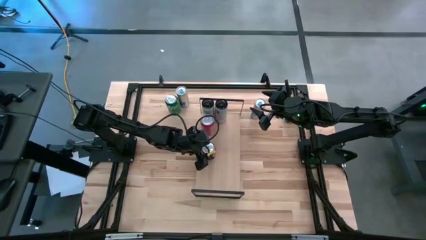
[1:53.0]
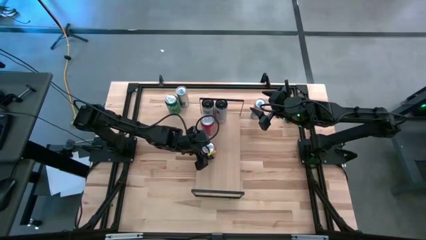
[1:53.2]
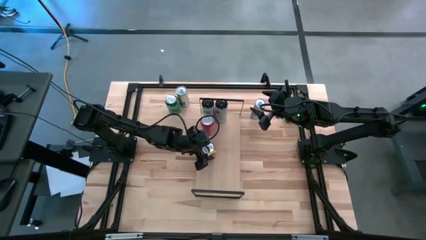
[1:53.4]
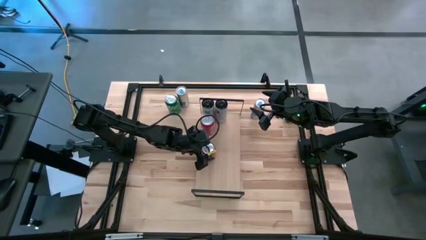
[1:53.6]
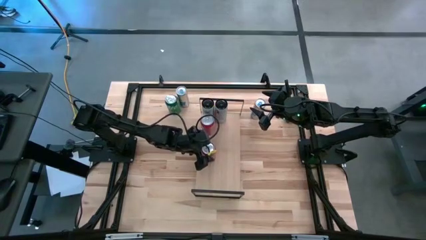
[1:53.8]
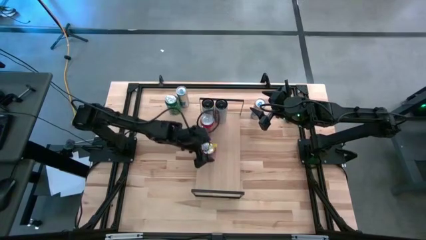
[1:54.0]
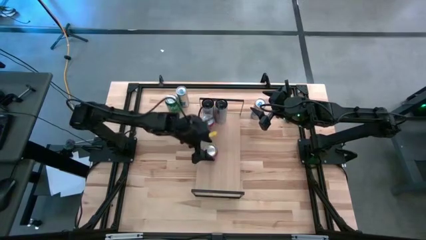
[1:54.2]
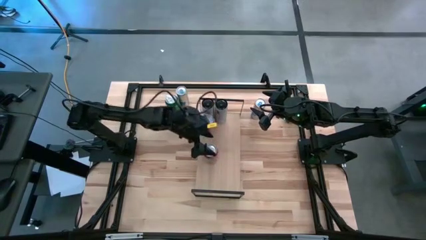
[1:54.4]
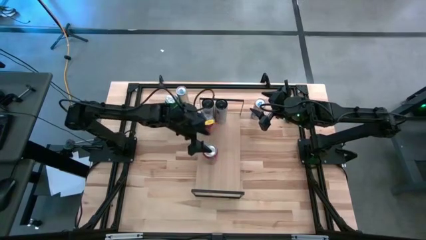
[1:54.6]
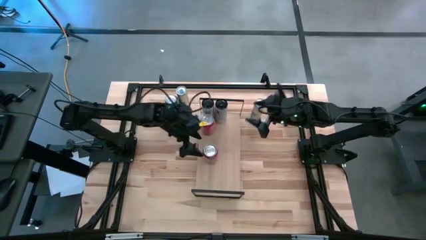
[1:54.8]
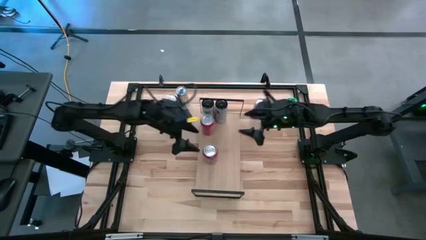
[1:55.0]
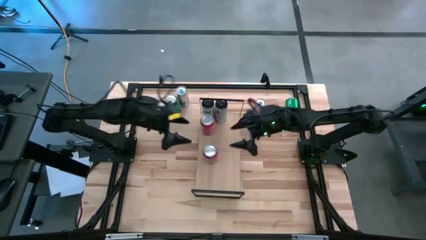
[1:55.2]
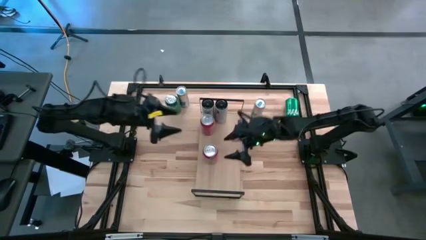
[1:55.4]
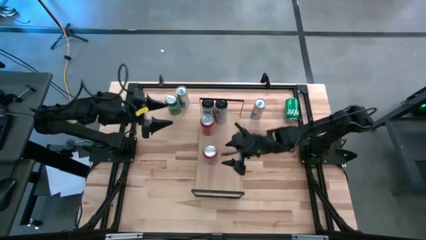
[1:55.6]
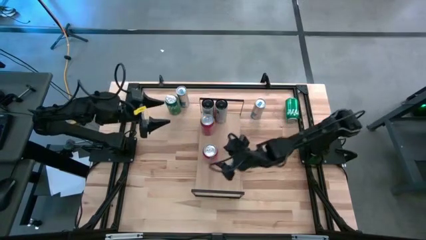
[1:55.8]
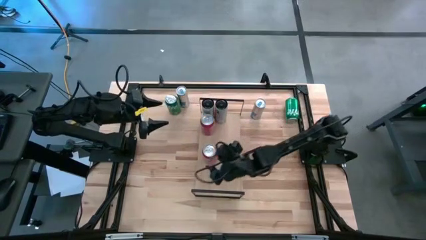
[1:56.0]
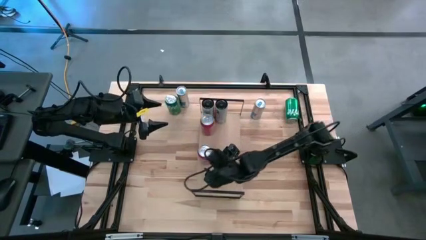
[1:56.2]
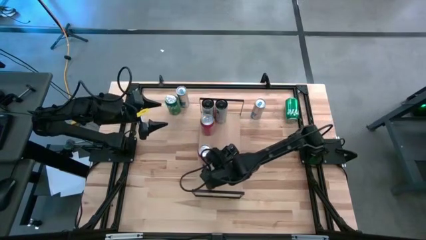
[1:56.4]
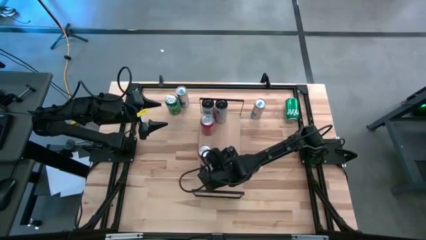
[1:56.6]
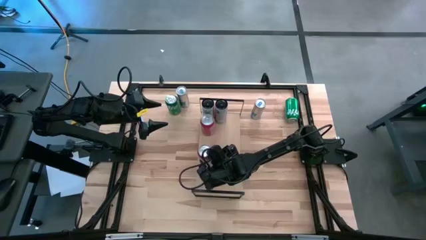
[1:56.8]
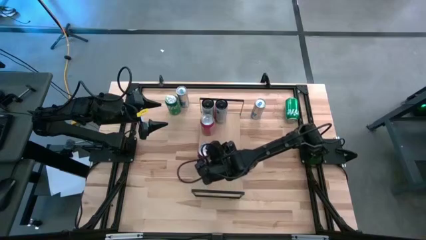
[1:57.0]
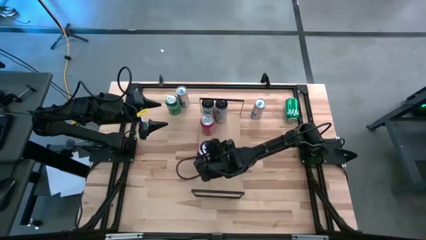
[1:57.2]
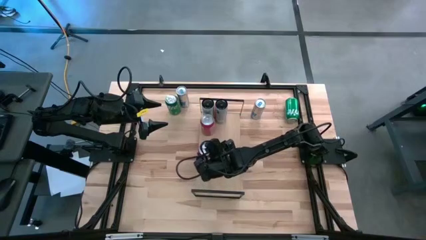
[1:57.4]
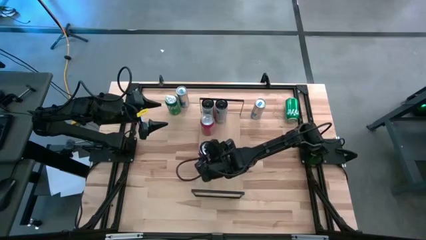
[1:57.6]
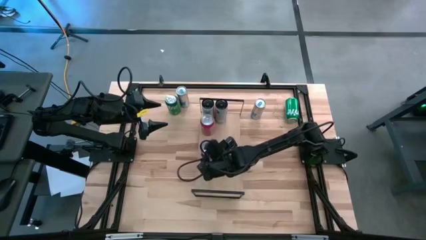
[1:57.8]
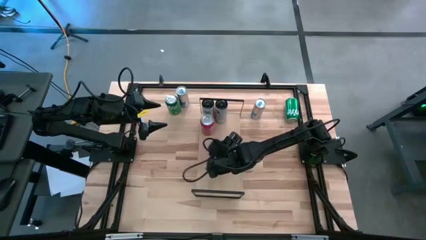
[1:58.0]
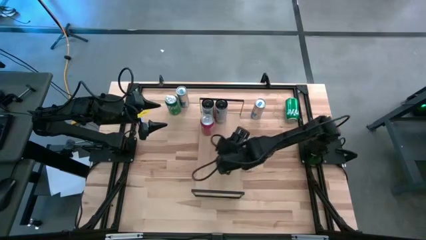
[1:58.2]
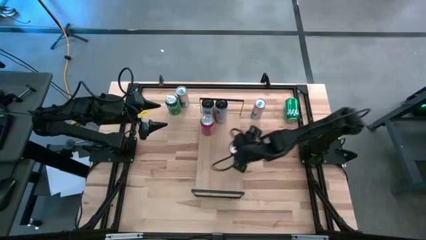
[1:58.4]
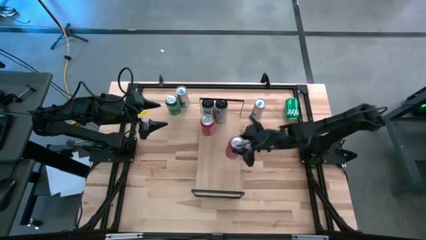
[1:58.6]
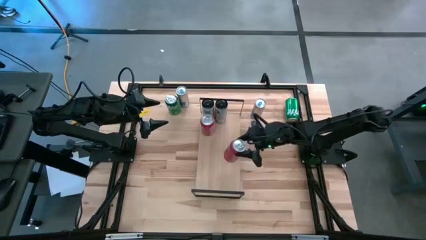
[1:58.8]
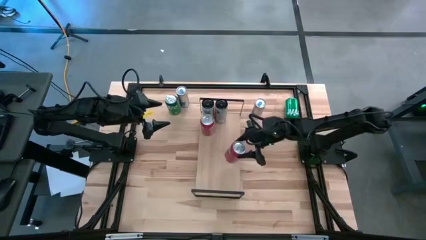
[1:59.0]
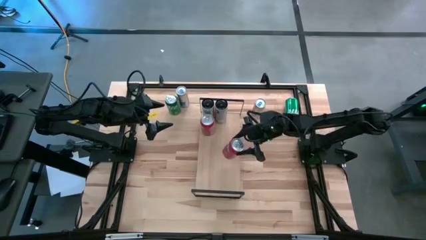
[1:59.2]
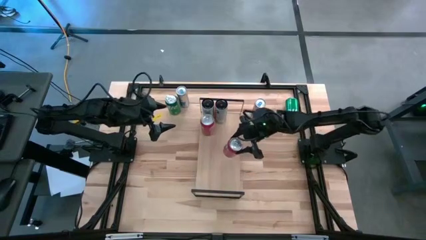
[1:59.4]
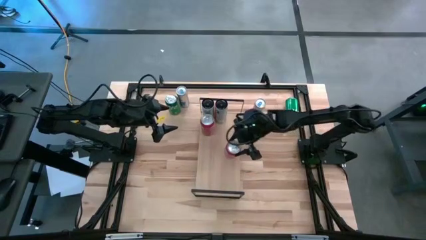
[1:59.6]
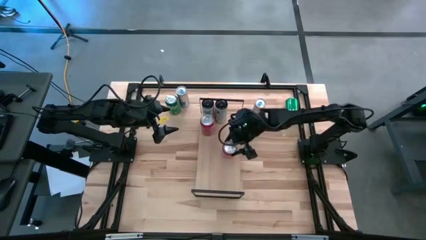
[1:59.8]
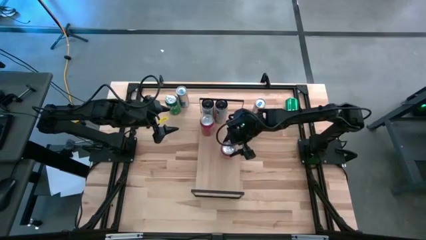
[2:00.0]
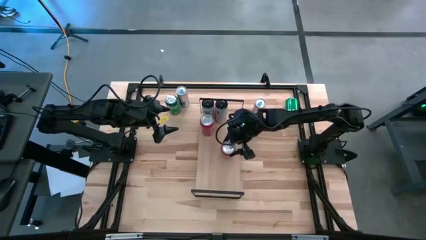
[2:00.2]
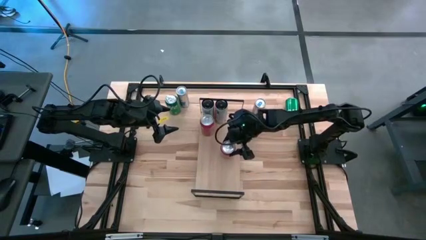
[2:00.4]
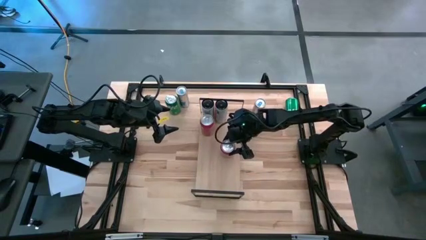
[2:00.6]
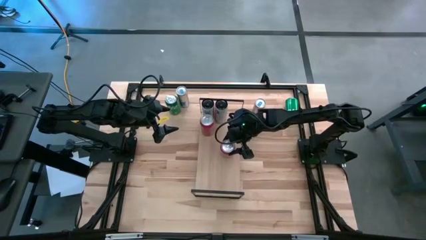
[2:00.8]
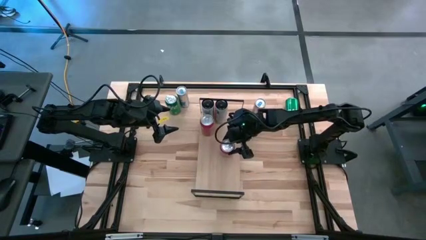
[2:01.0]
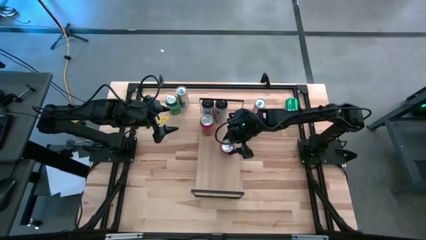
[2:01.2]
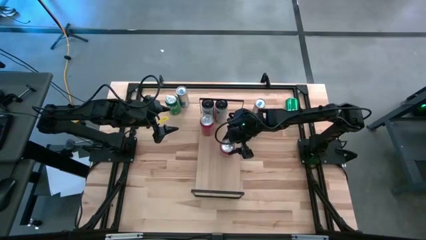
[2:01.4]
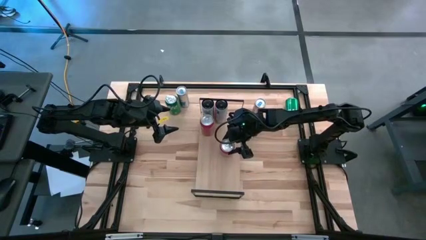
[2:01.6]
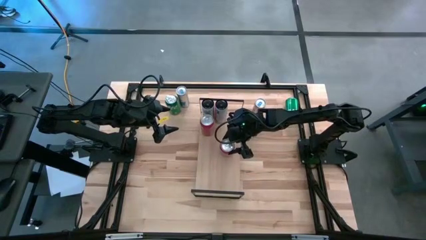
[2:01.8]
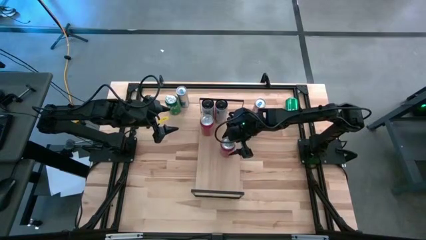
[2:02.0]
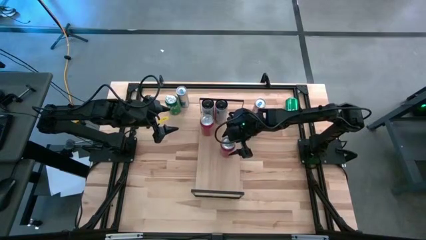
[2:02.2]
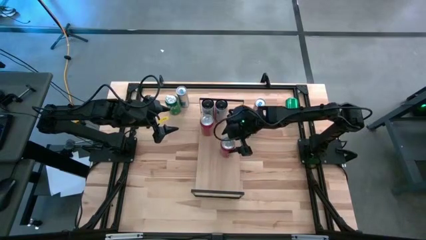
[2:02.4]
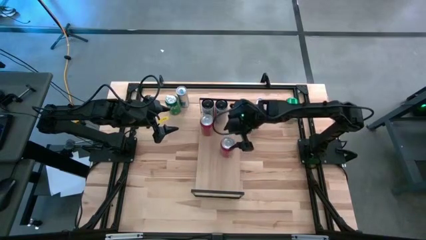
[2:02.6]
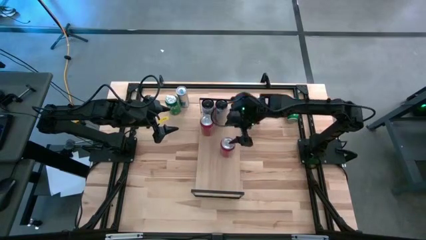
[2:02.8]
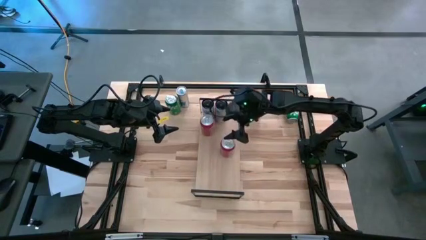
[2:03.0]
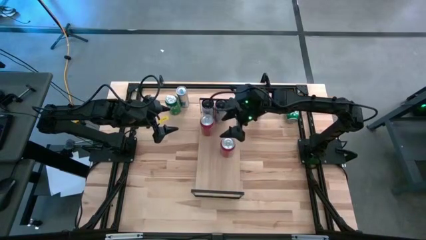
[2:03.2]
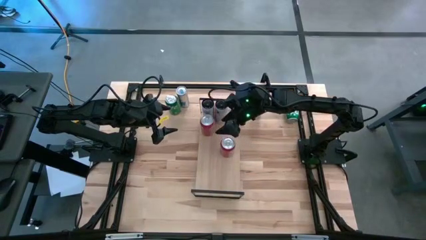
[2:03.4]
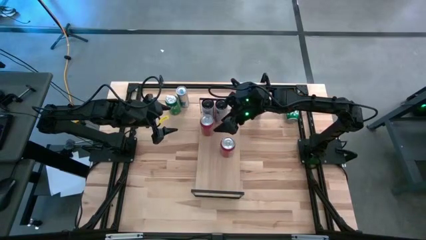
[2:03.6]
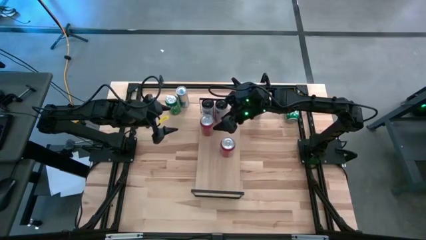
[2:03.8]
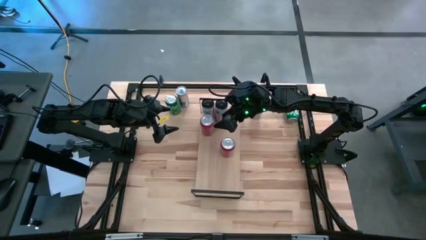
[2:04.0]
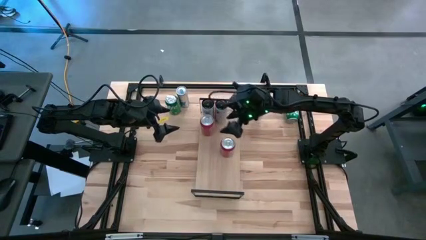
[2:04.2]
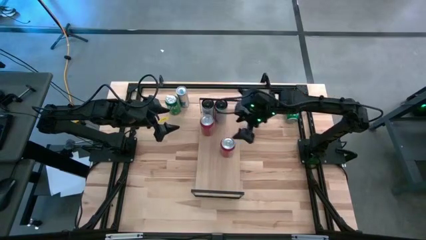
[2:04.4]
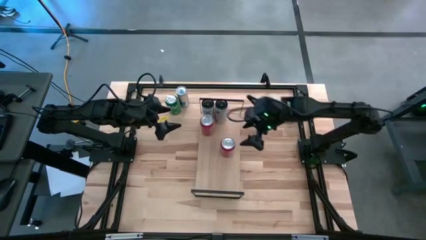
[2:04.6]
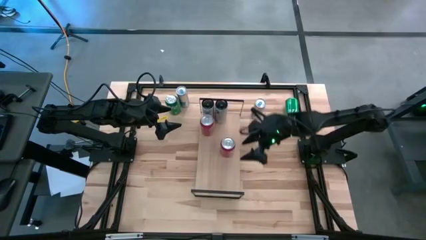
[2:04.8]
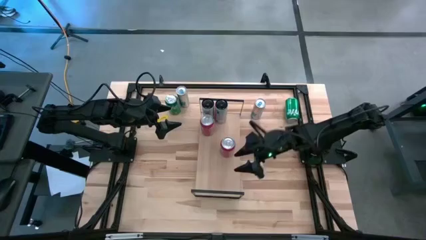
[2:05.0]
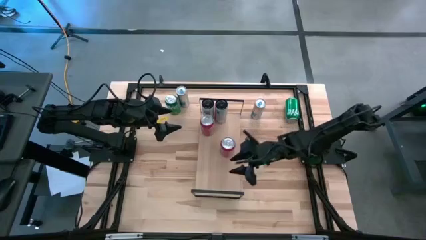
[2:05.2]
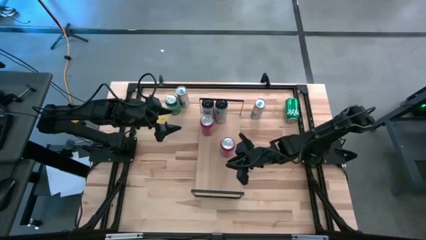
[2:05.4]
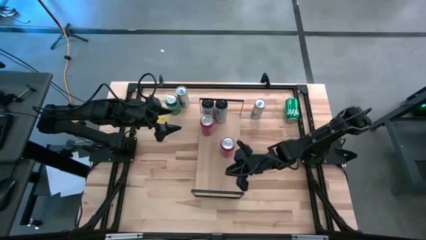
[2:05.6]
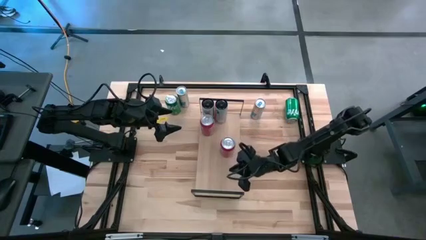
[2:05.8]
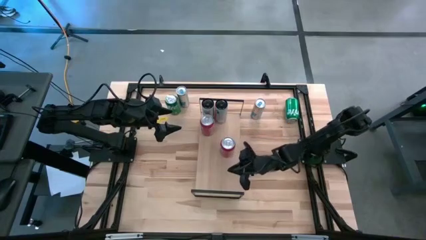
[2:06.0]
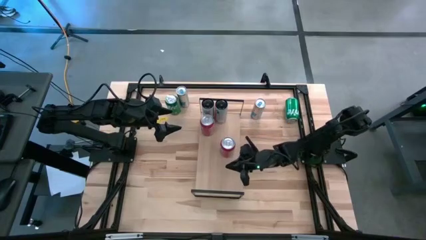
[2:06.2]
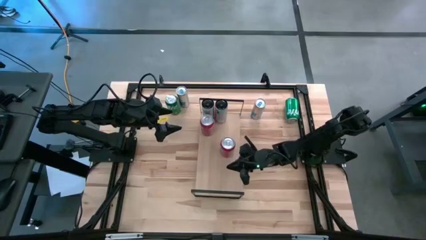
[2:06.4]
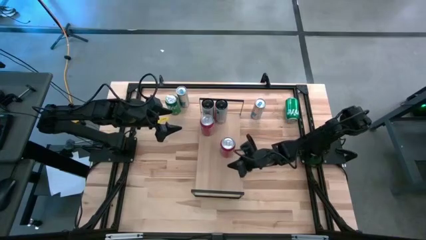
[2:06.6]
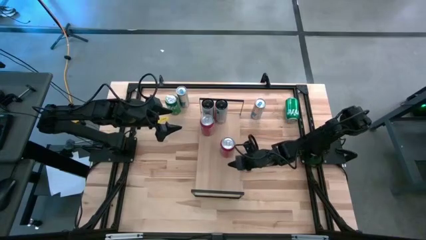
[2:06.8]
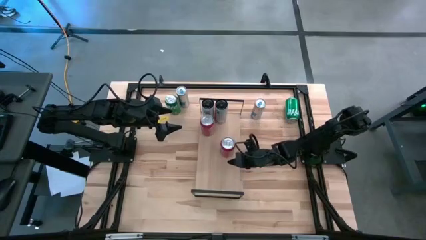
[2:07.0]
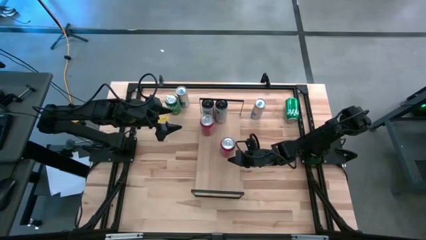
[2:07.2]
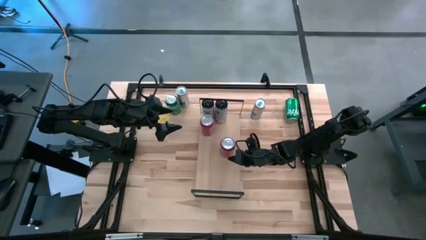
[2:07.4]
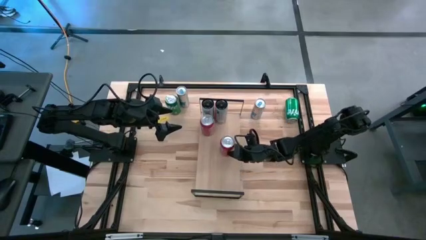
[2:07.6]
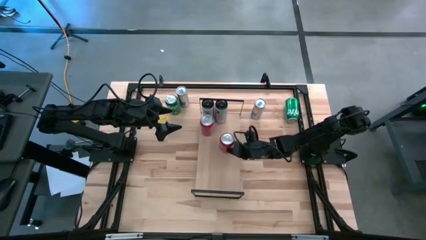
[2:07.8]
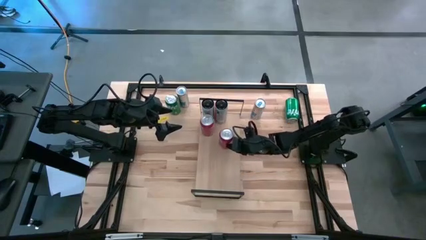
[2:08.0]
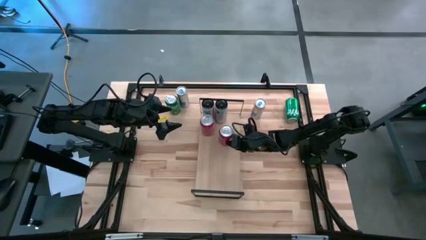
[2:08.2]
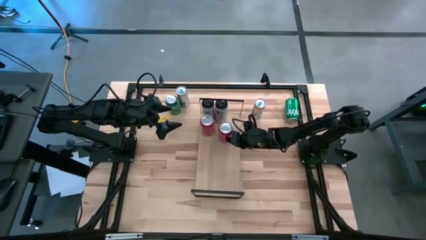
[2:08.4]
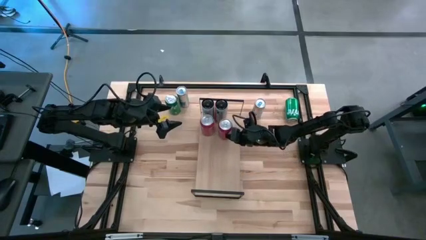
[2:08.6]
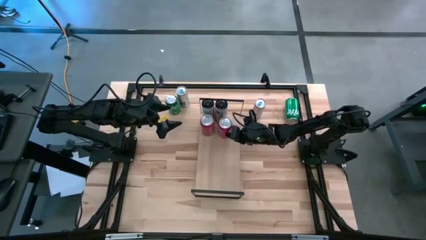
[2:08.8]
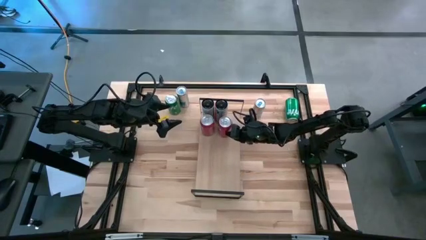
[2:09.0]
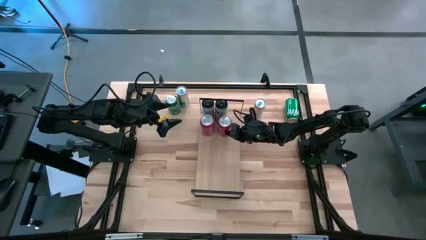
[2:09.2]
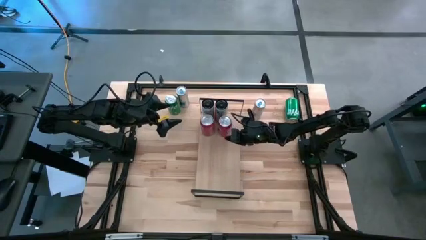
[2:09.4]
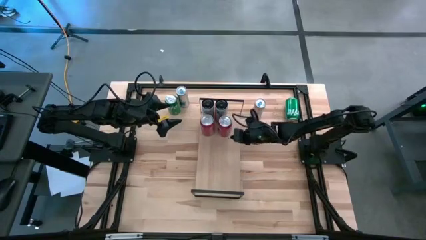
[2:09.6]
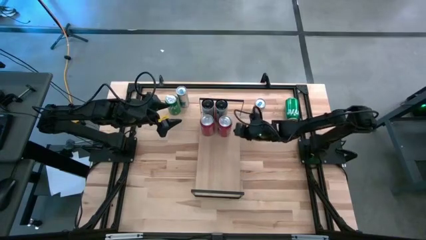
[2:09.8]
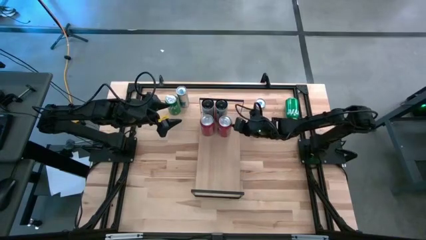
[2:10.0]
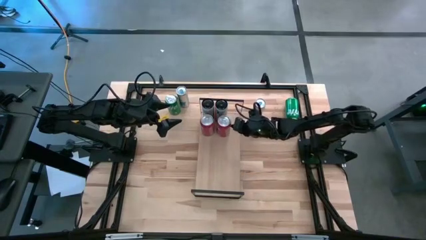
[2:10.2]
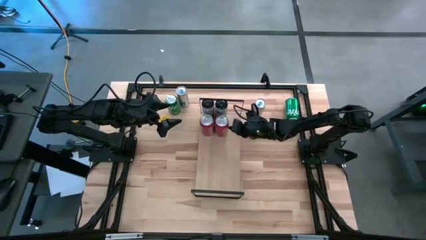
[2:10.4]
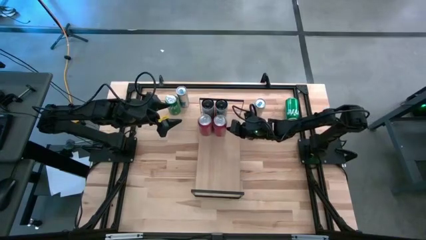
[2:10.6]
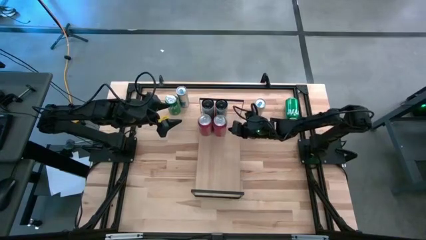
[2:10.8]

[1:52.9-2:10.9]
Task: Place canned beverage on shelf
Put the left red soda can, aligned with the other red soda can on the shelf
